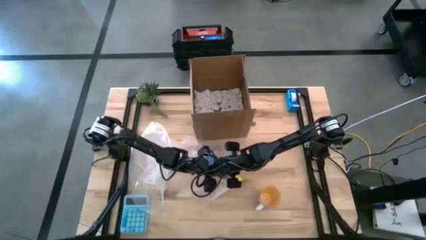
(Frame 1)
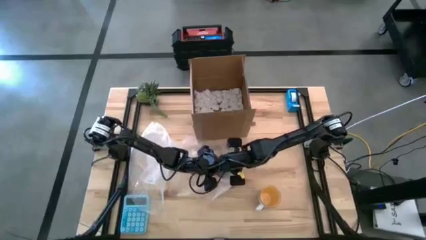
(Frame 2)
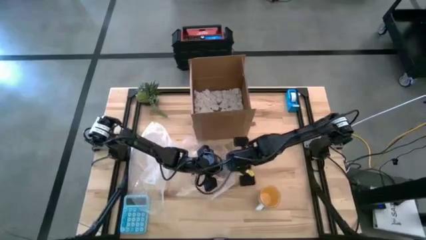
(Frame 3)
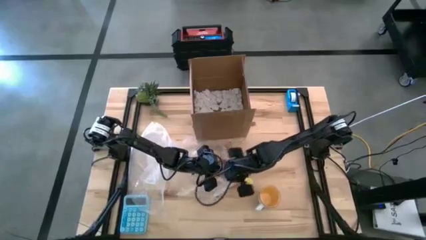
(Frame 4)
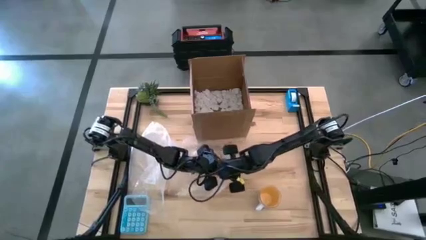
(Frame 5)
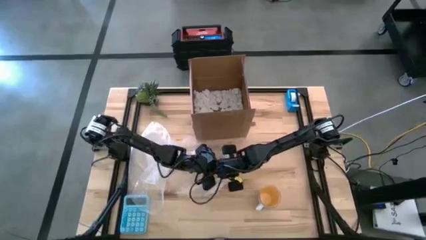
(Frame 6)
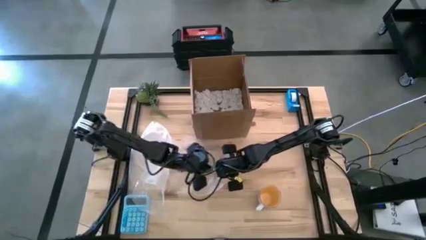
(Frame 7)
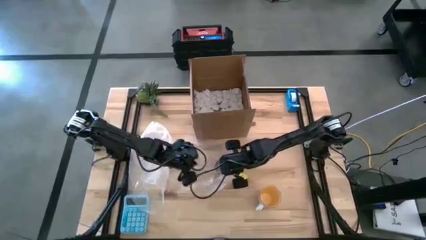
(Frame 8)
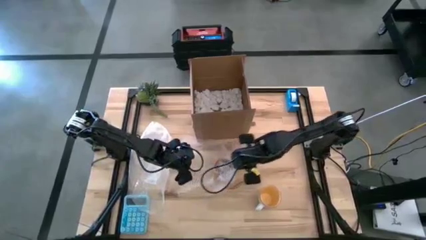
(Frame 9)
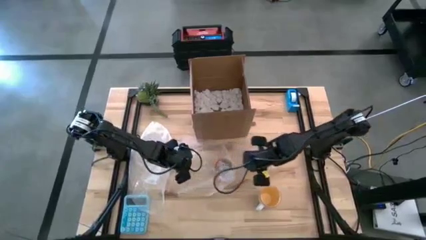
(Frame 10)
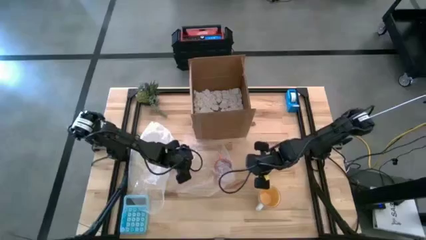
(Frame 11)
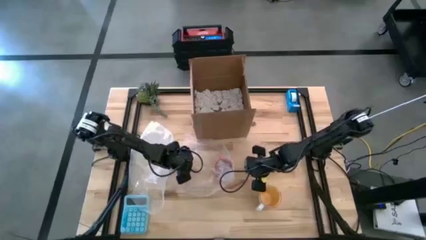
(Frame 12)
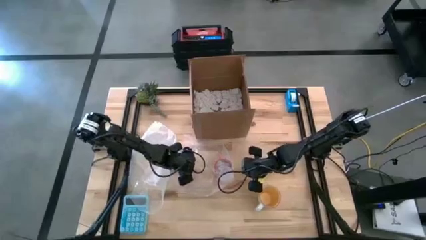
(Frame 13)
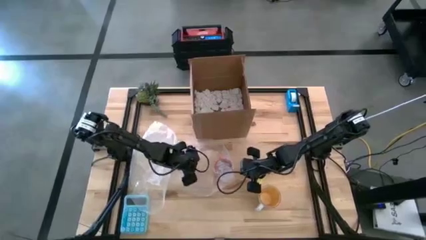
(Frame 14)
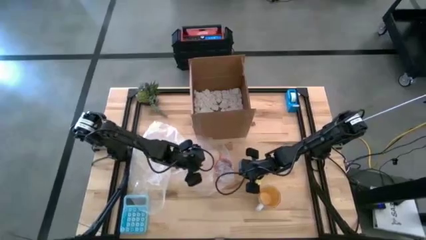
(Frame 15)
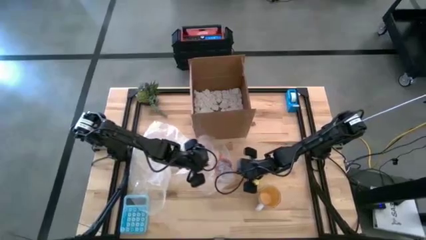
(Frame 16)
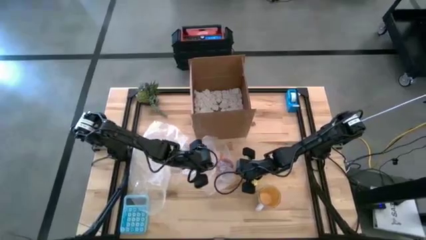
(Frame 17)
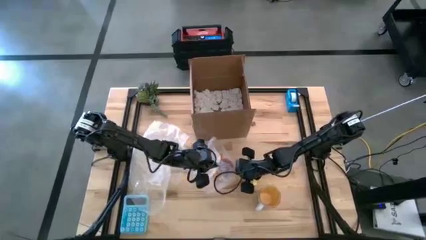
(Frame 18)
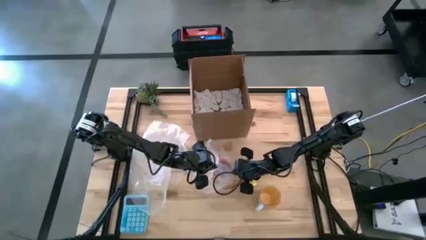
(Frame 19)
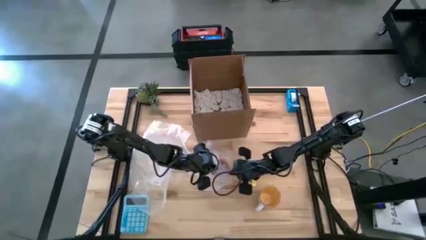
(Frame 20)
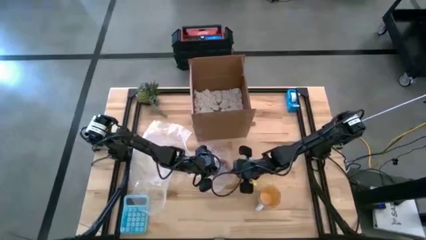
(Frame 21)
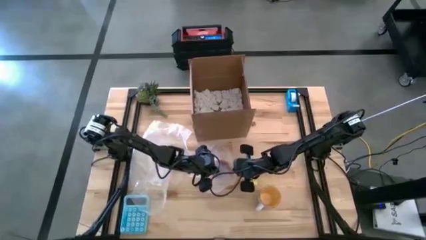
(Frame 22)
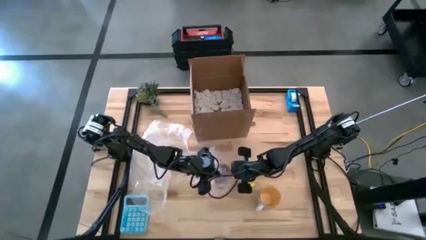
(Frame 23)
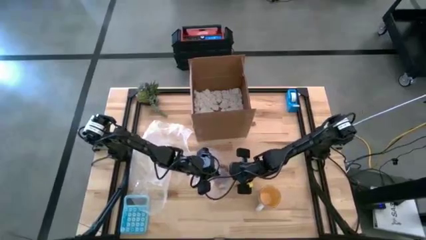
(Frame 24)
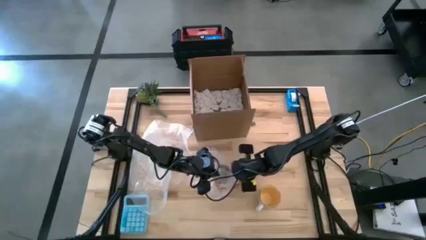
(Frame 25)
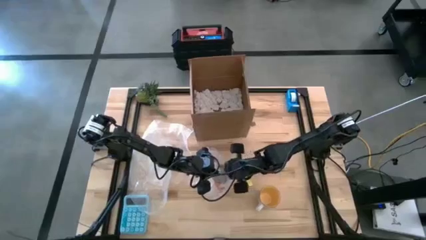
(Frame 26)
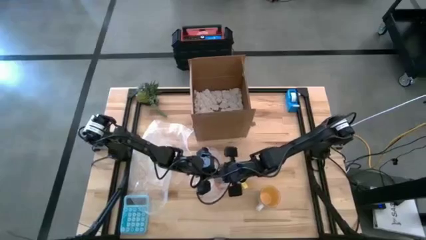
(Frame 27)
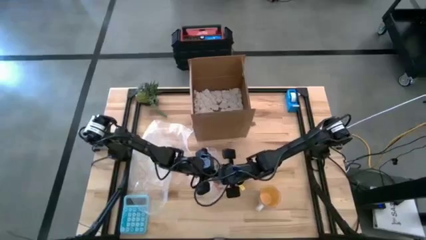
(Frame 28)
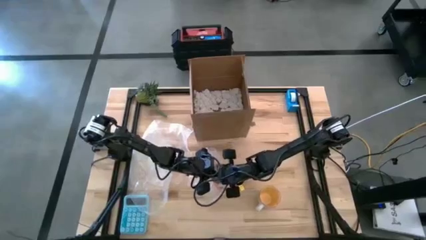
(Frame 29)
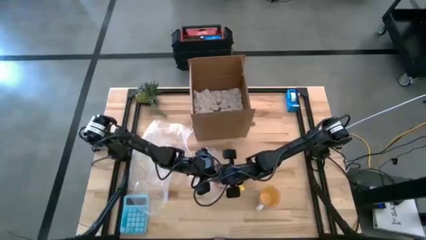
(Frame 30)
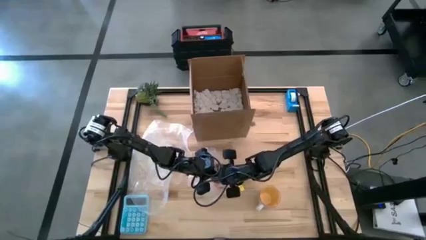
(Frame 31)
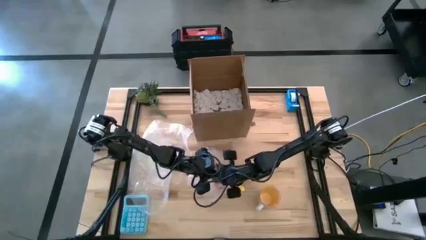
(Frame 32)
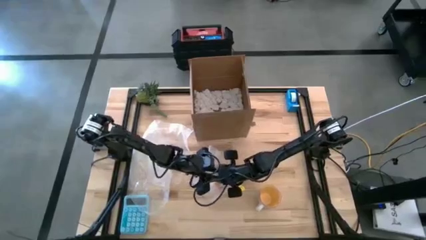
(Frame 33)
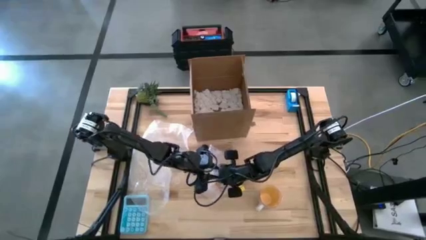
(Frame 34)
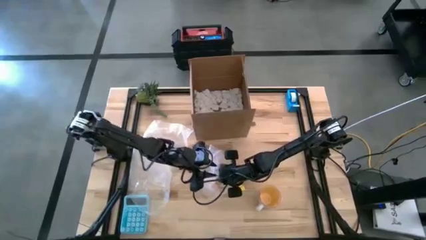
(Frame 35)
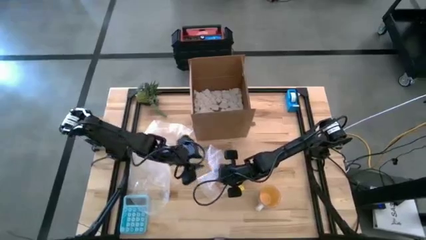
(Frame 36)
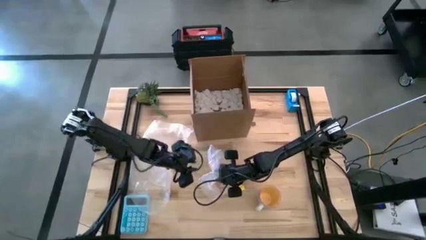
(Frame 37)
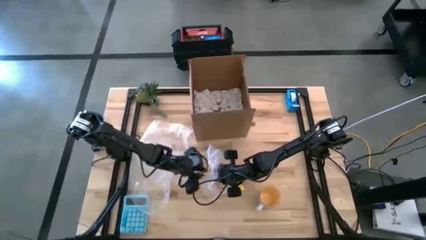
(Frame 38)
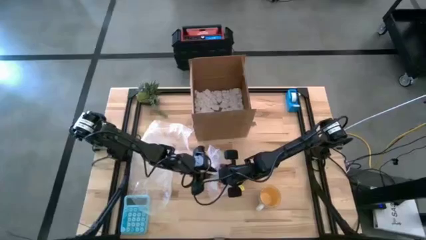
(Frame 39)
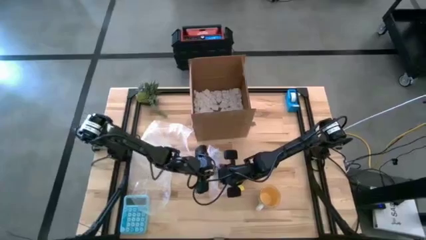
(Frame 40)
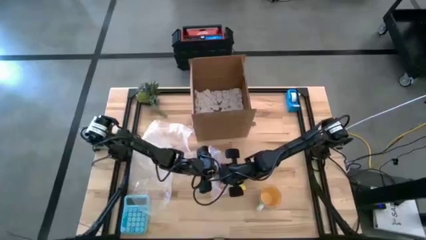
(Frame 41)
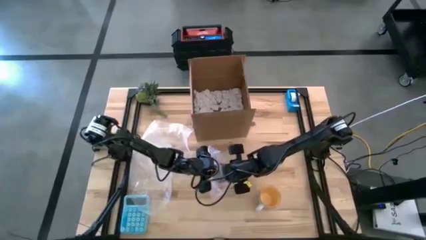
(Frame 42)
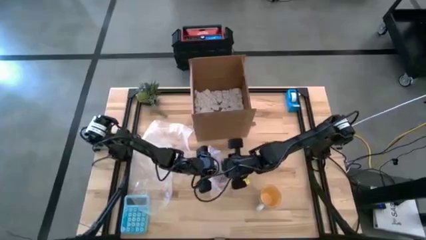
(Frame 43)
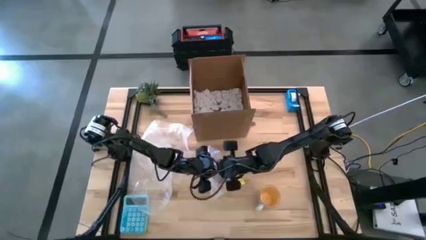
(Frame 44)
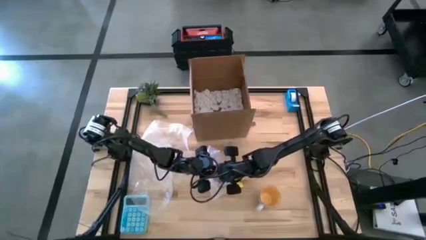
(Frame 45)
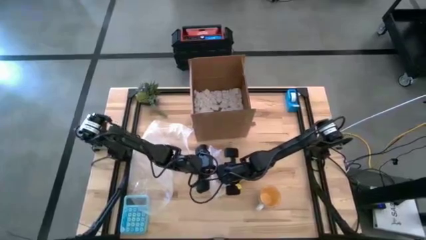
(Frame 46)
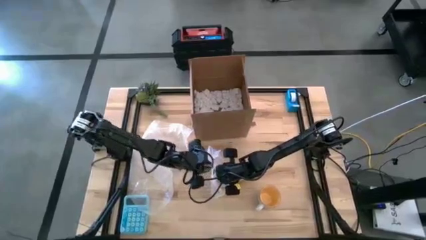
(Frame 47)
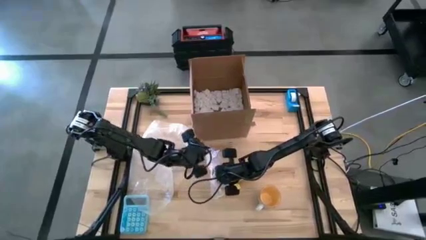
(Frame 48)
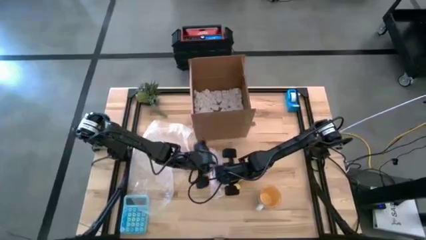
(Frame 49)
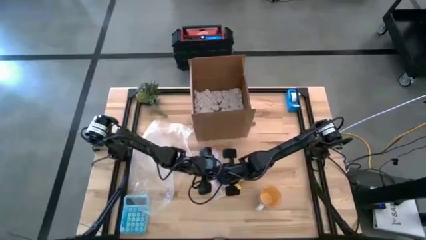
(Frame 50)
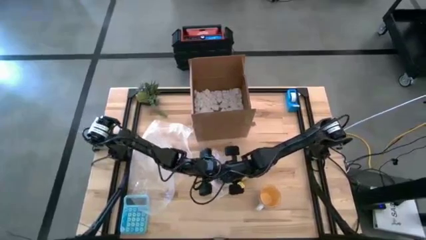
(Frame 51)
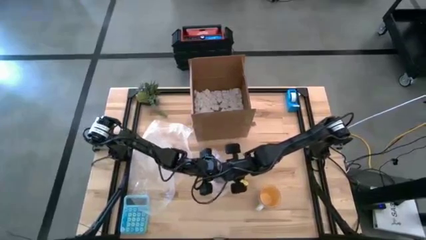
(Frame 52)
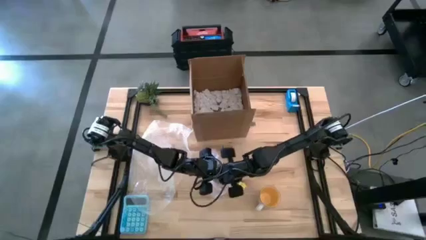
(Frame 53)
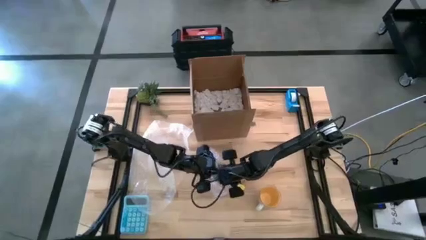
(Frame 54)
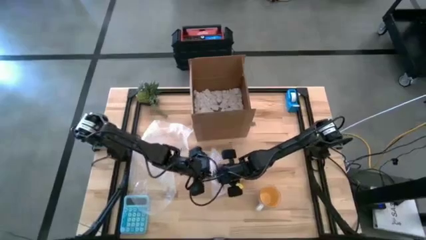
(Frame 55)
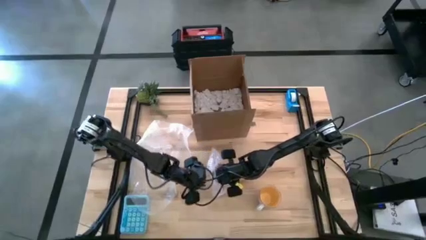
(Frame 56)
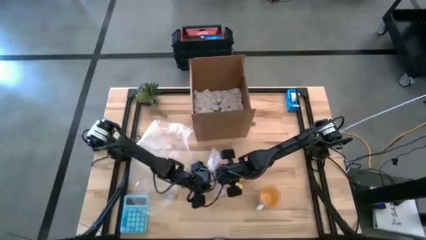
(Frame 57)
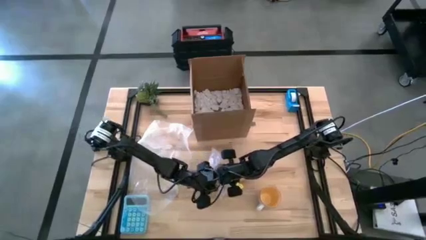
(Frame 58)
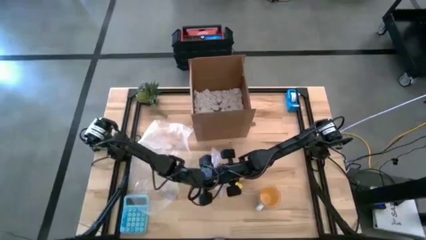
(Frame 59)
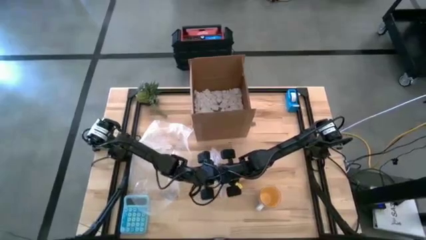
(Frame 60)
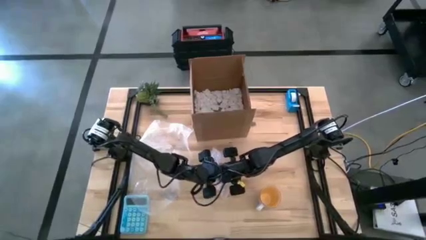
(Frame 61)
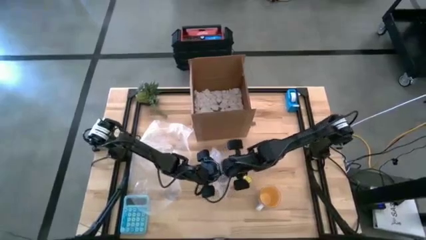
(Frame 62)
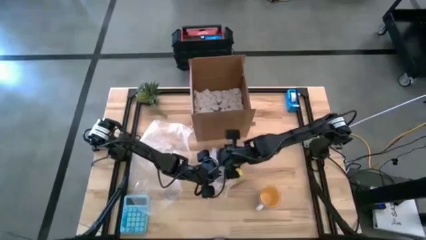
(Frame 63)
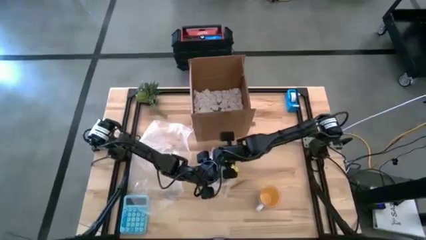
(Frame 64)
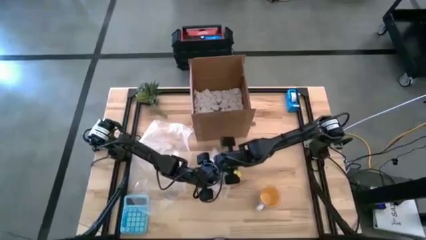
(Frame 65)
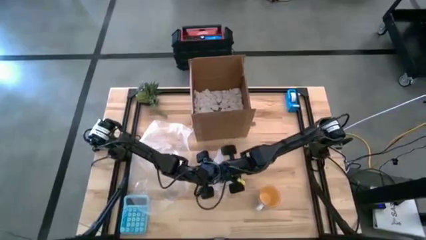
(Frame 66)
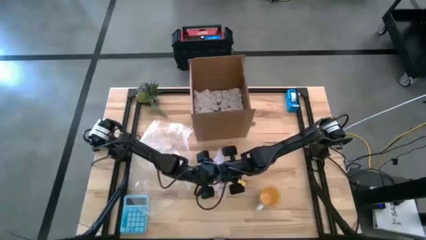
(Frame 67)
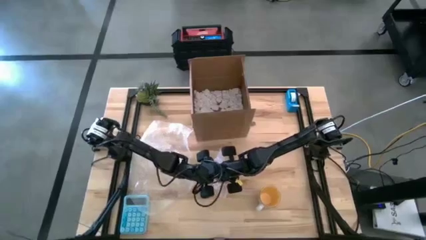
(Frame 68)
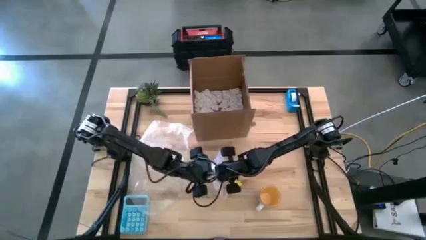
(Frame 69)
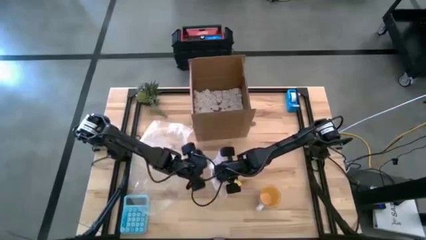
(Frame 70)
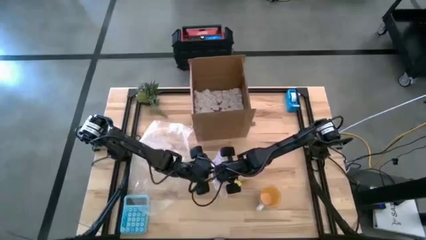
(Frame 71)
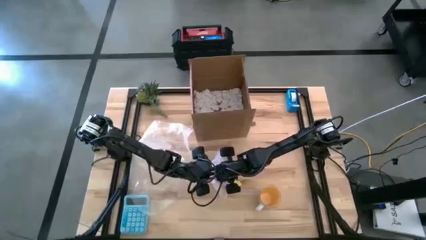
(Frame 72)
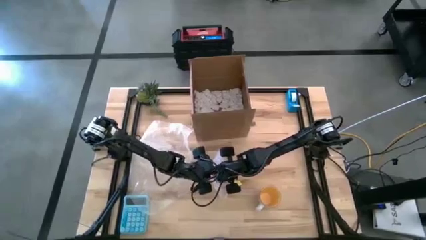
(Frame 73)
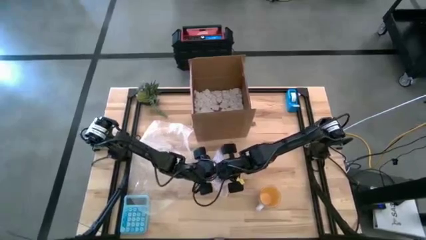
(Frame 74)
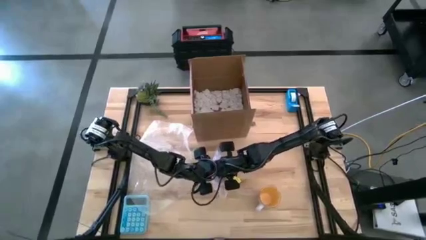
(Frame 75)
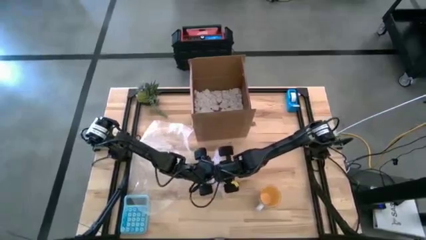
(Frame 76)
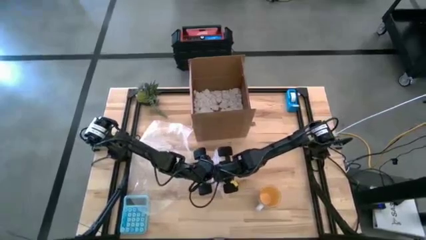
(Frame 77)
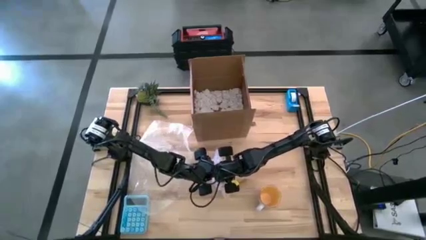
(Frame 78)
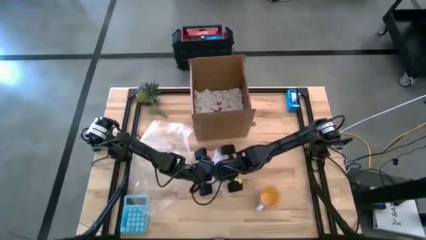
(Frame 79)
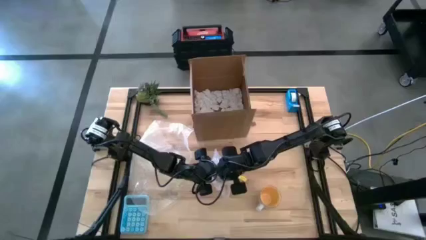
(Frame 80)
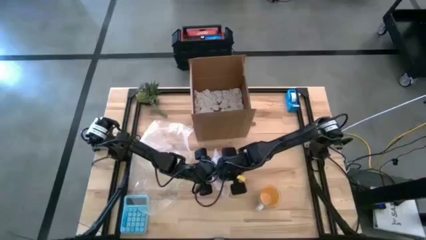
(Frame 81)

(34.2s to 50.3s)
Task: wrap mug
Wrap the orange mug with bubble wrap
